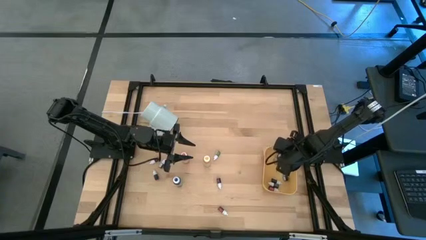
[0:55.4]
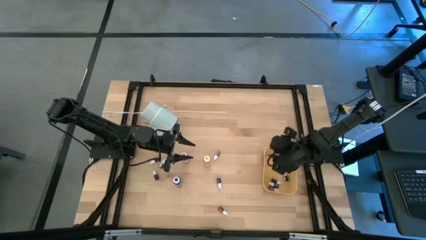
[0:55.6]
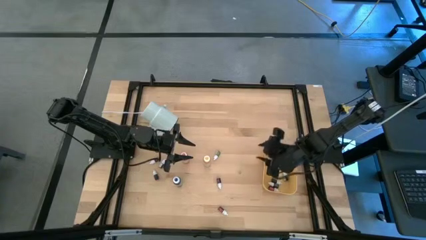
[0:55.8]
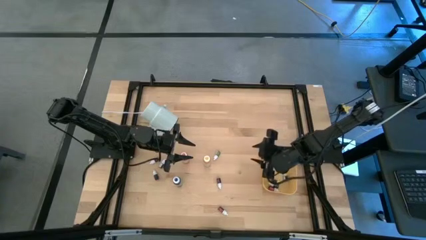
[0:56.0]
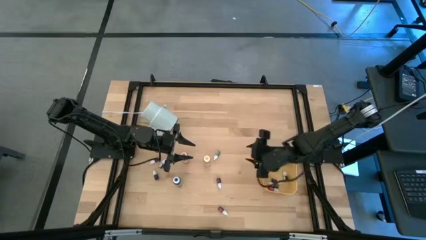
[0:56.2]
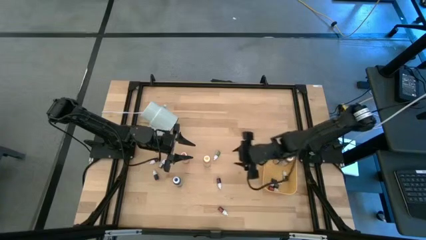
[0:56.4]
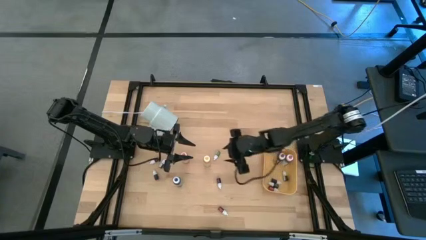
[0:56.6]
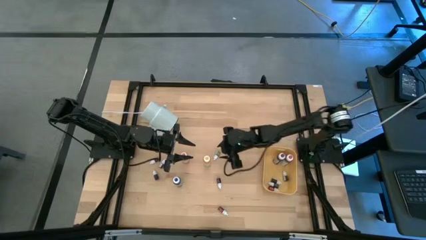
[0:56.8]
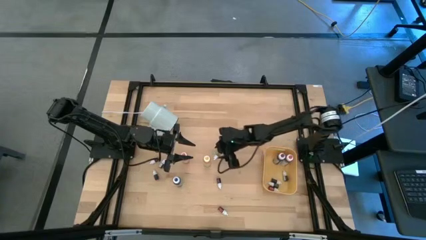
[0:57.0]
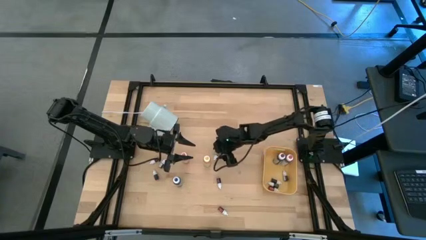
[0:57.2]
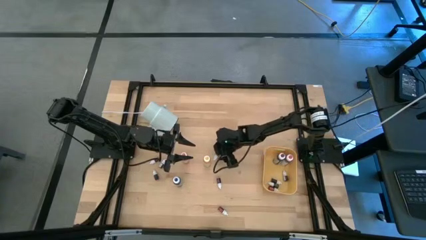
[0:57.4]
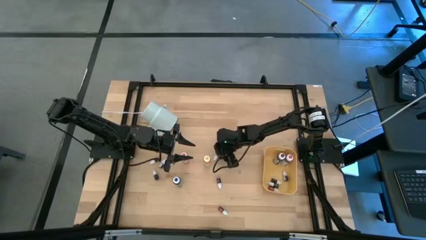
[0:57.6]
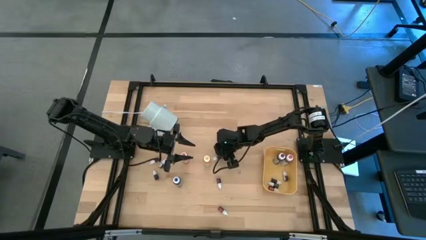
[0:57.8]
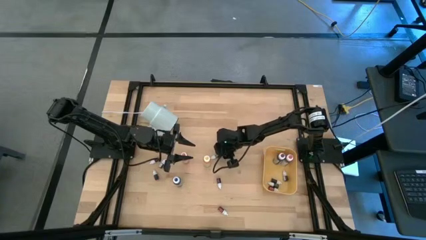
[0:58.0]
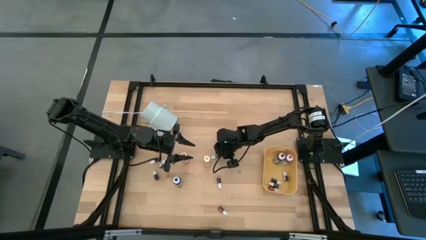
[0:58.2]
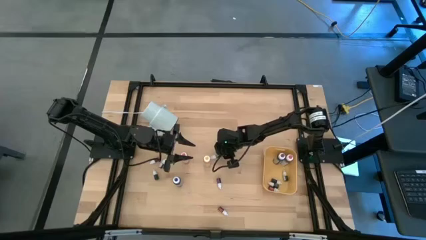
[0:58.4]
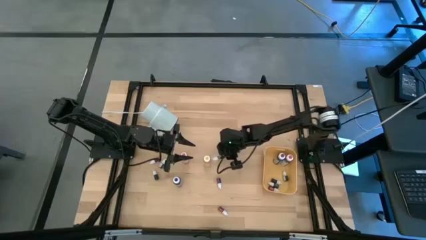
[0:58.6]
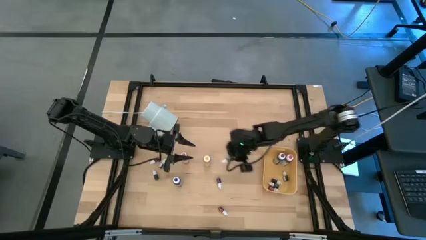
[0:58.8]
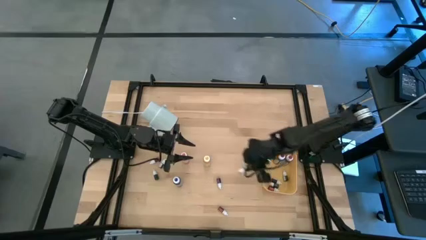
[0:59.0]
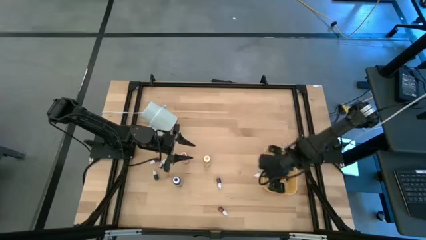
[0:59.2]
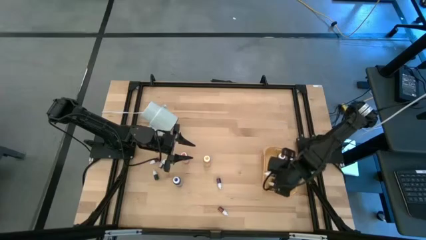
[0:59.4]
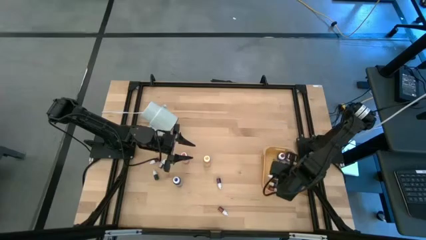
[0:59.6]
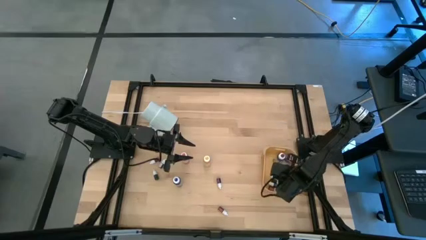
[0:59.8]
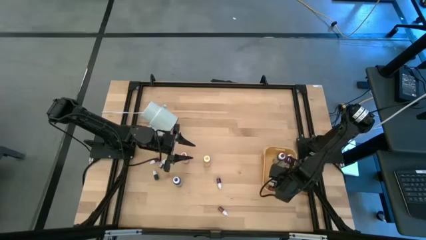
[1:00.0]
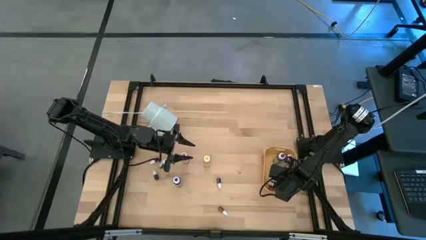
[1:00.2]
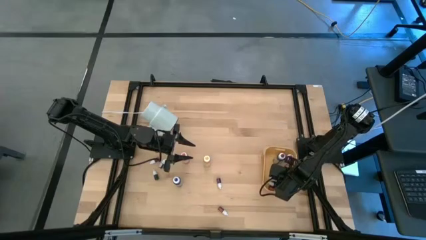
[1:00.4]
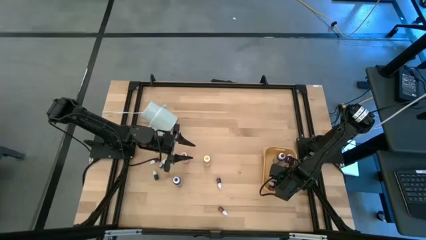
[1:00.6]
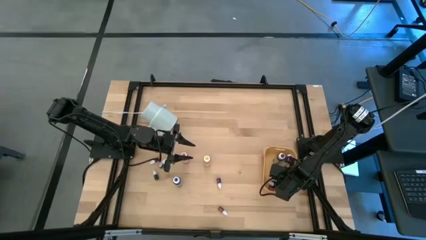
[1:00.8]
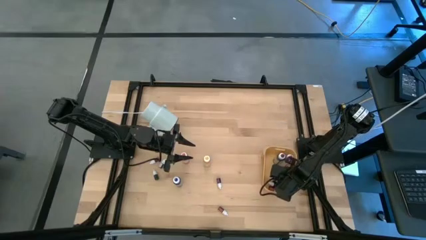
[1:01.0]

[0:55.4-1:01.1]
Task: Pick & Place food coloring
Put the small green food coloring bottle into the yellow bin

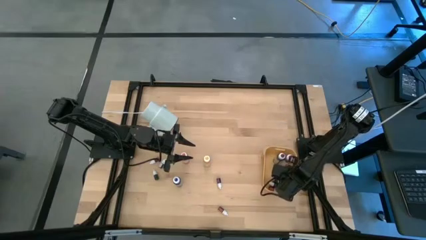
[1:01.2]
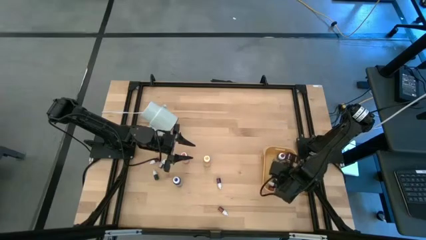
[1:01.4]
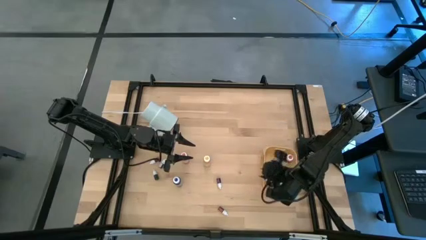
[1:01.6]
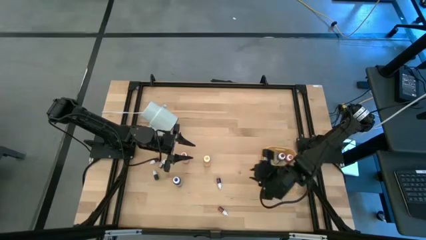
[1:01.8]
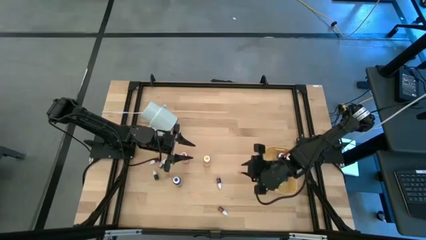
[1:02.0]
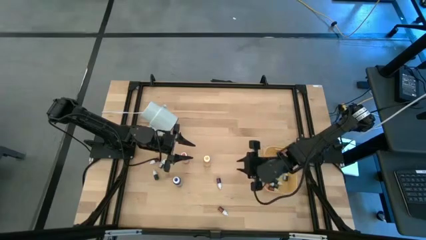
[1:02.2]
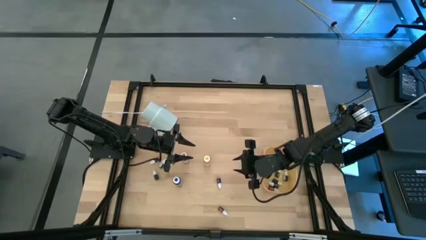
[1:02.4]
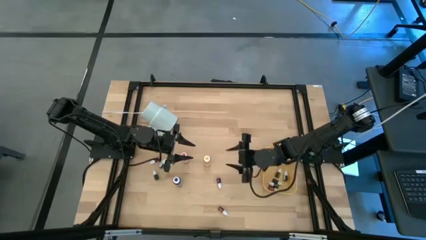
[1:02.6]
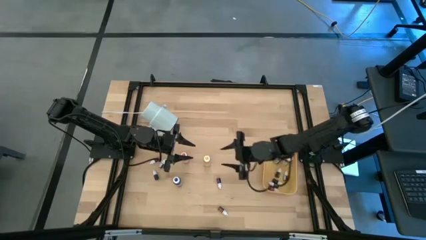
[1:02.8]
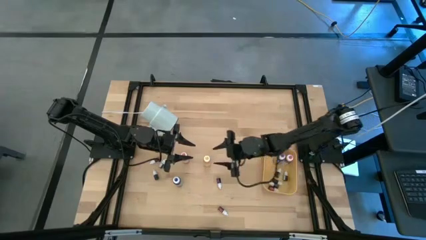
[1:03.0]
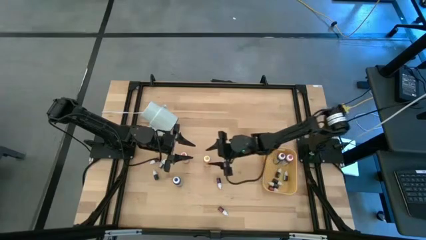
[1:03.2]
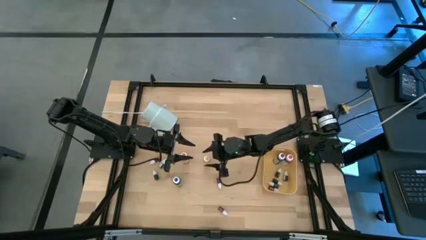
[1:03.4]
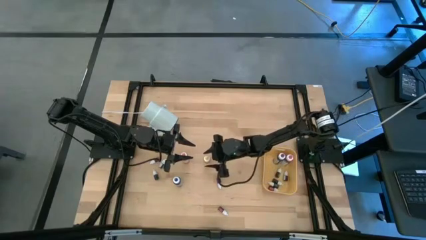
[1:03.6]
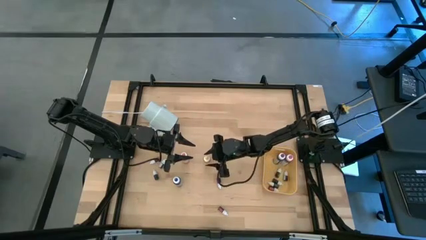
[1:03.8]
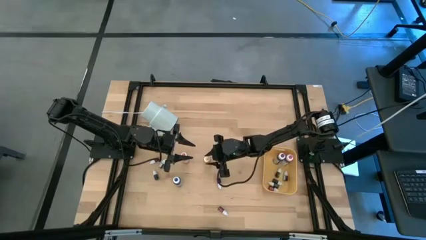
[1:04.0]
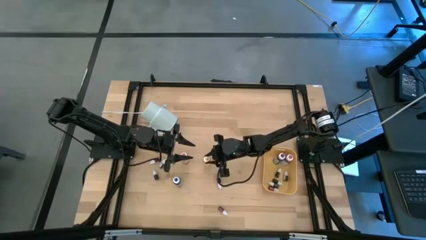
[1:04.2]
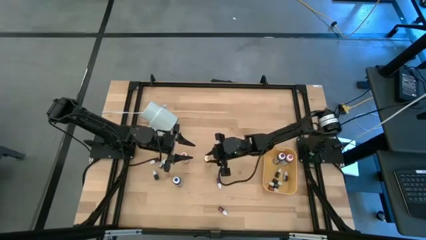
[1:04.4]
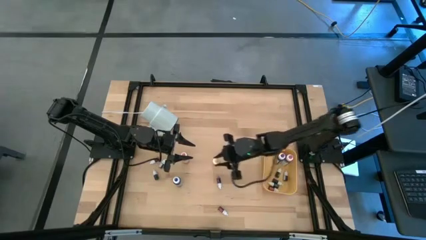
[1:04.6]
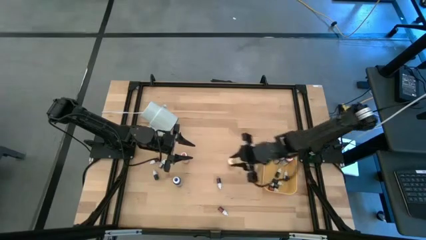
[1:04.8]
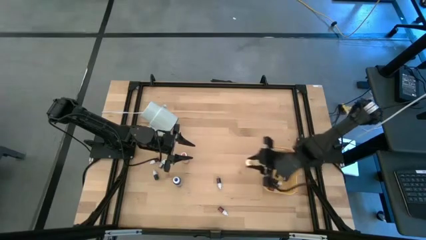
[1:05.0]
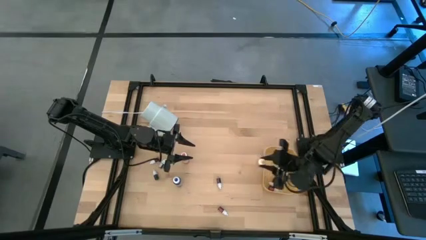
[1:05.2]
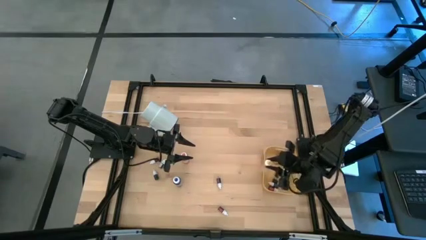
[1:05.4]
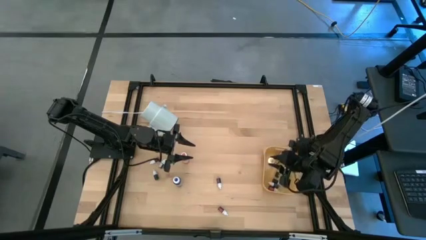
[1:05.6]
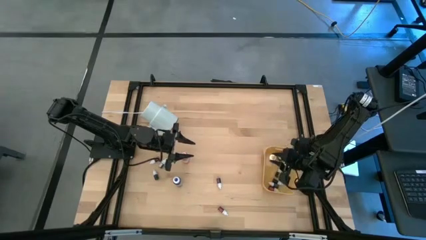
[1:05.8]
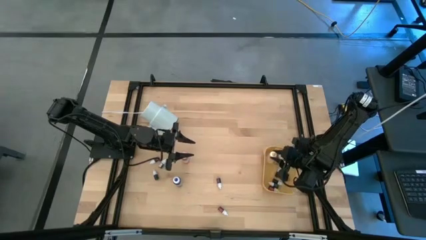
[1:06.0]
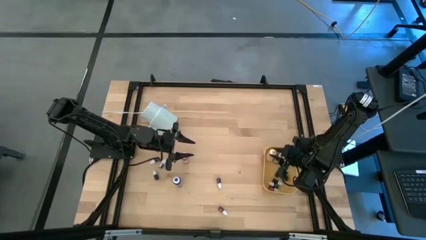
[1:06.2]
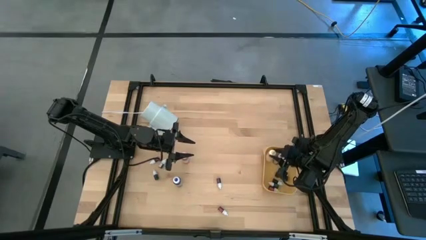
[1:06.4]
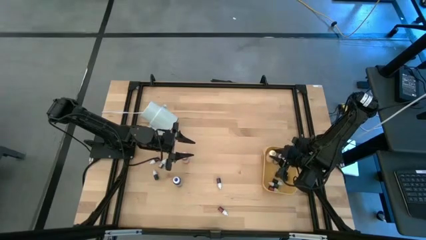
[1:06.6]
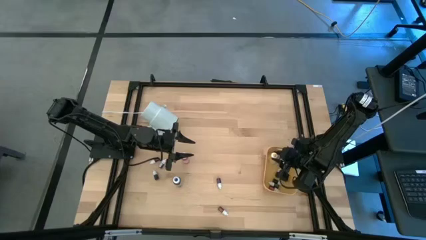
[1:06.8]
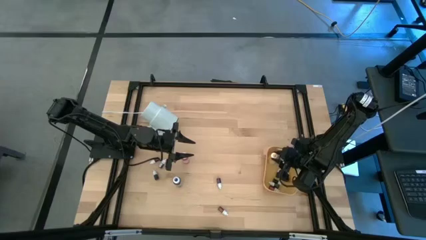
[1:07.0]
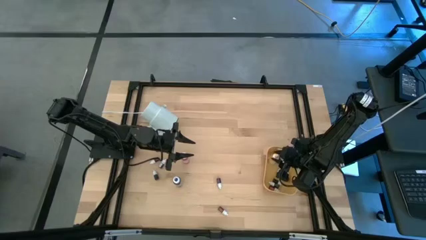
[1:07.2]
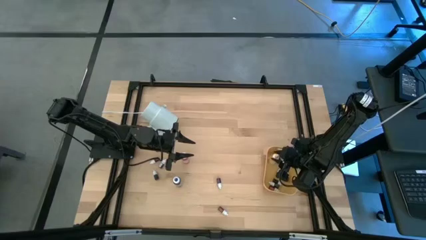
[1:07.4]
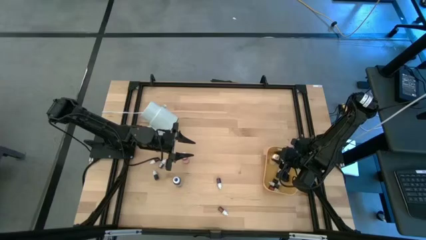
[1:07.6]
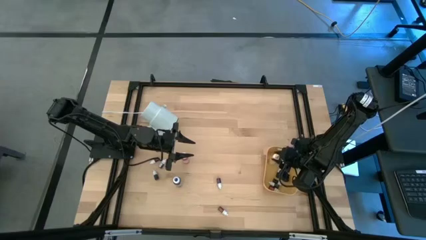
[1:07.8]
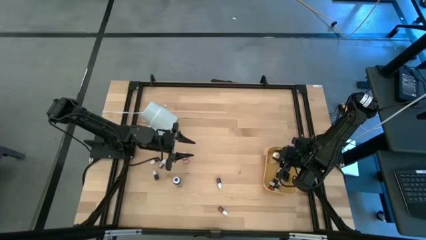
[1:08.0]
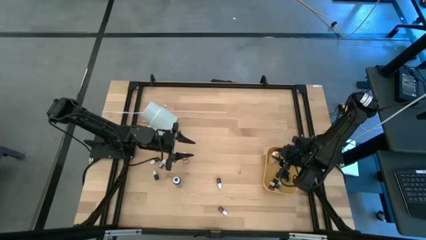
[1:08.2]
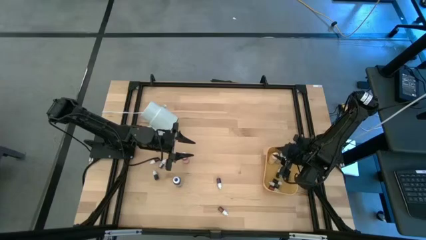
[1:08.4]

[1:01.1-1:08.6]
Put the large yellow food coloring bottle into the yellow bin
